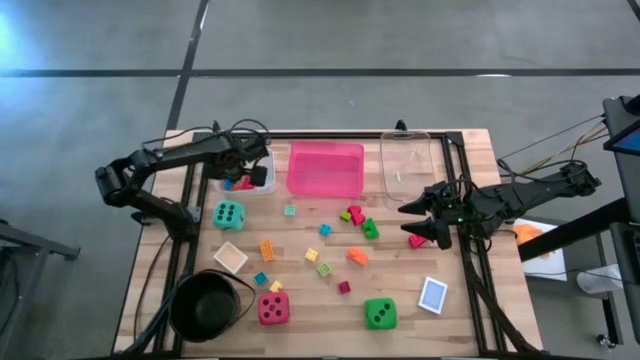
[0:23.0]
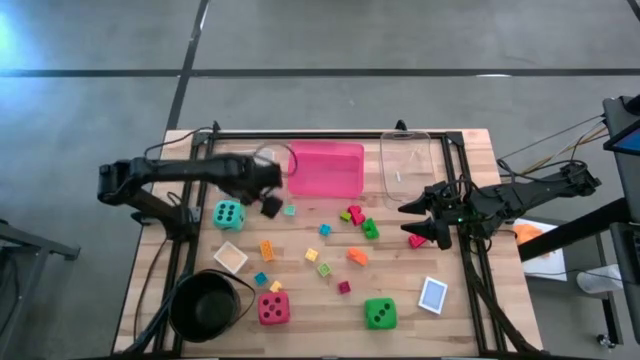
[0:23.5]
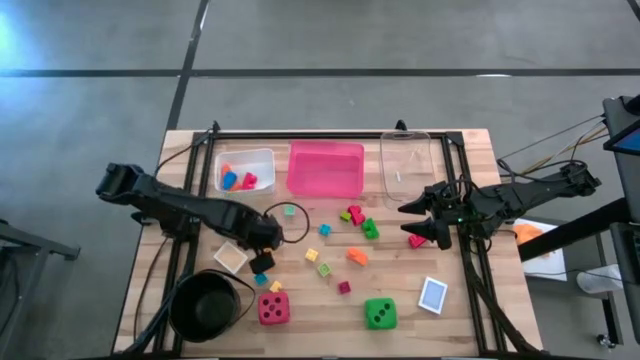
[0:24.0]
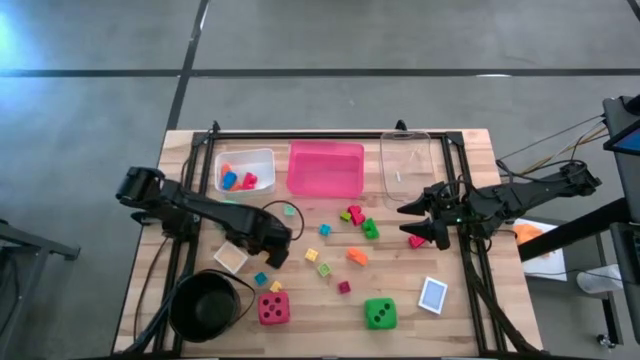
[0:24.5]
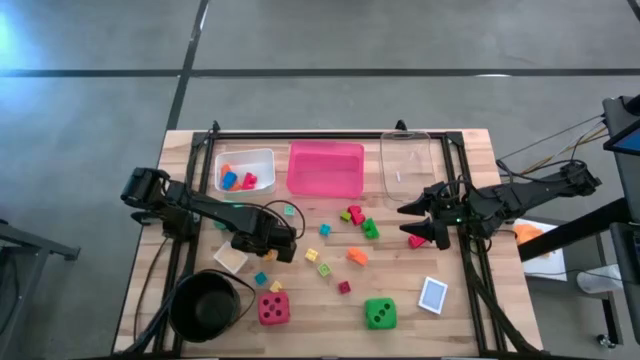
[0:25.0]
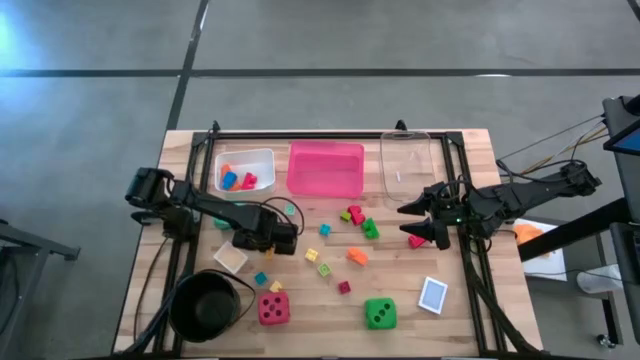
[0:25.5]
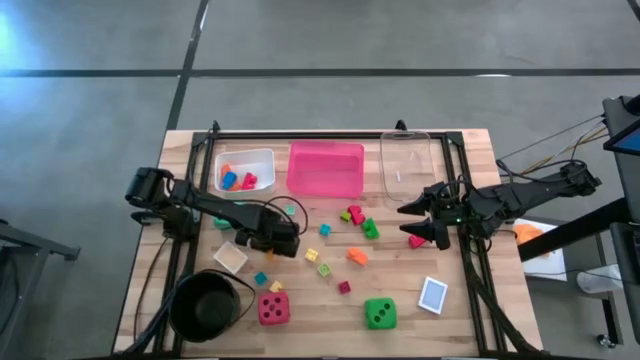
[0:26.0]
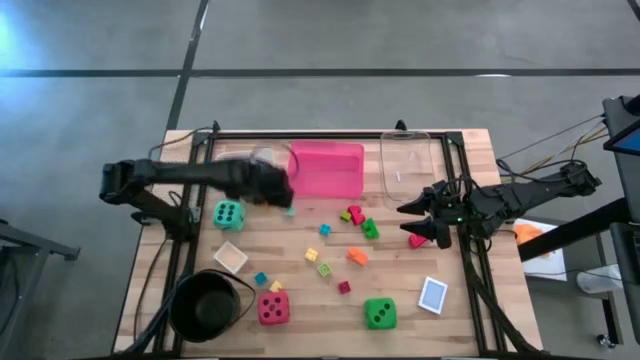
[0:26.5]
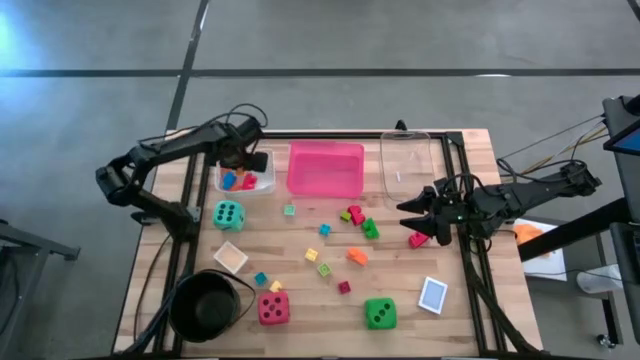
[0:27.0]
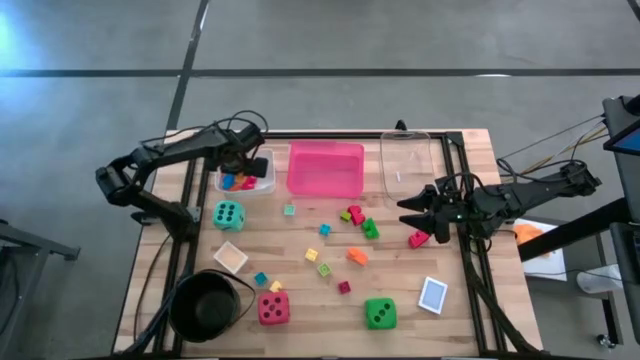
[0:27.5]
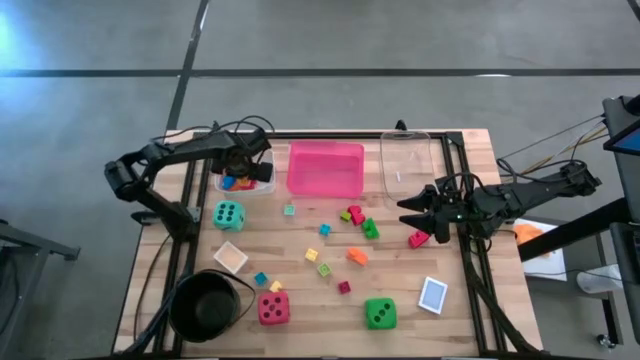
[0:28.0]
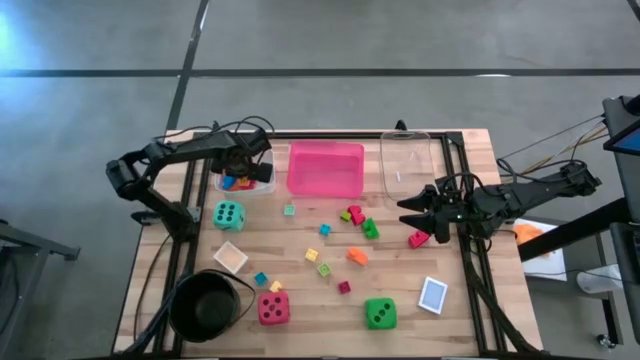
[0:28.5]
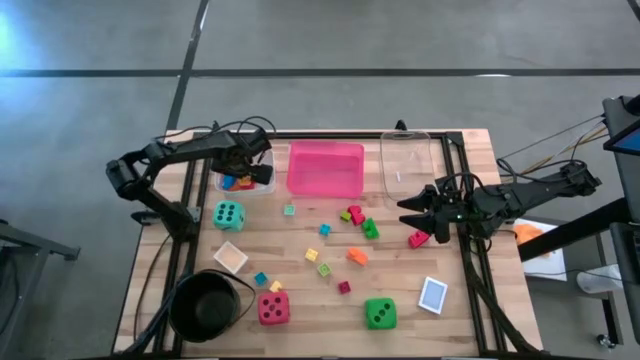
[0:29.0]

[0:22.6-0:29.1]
Task: Pick & Place Toys
Put the yellow game piece into the white bin

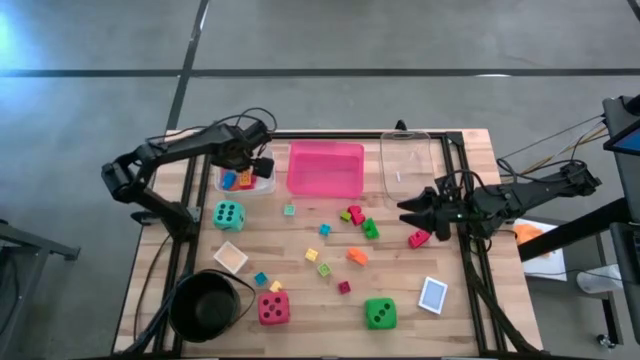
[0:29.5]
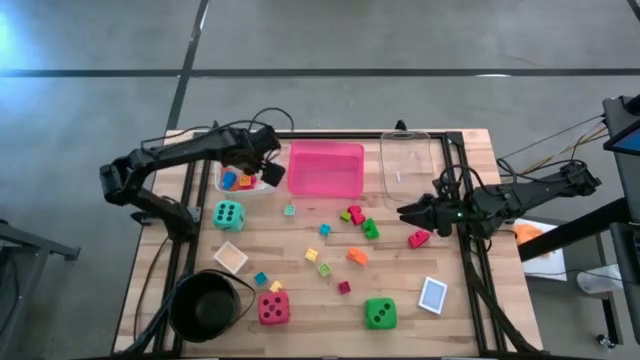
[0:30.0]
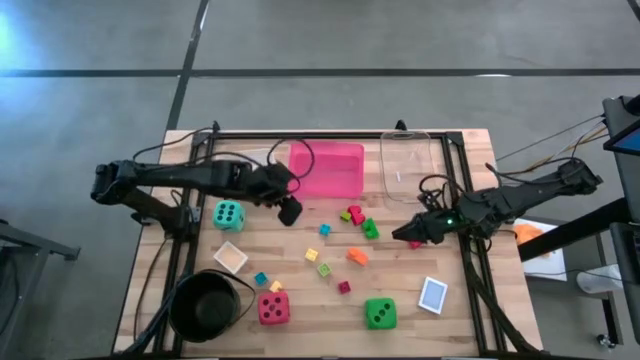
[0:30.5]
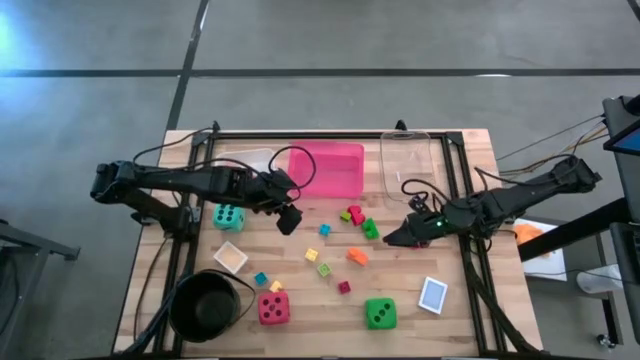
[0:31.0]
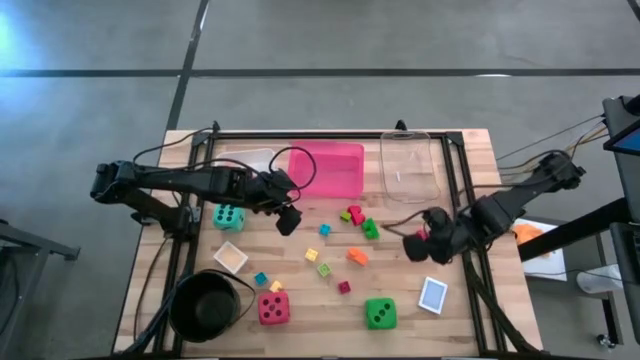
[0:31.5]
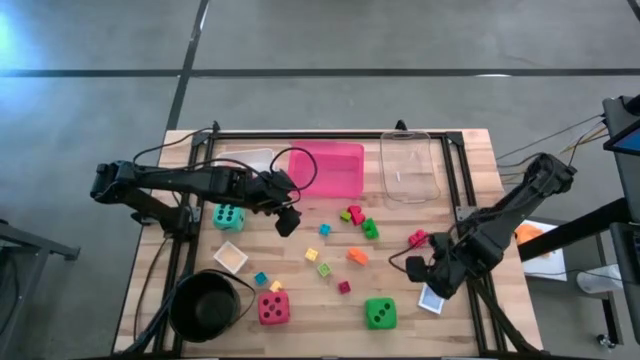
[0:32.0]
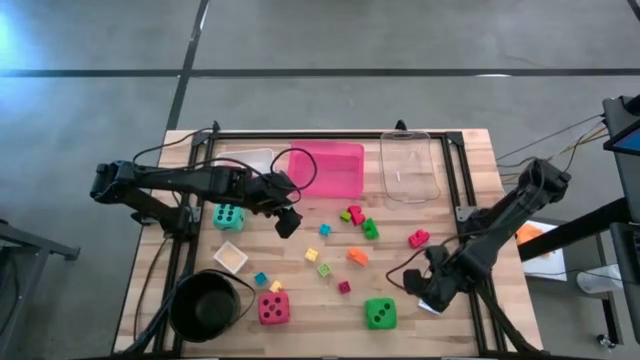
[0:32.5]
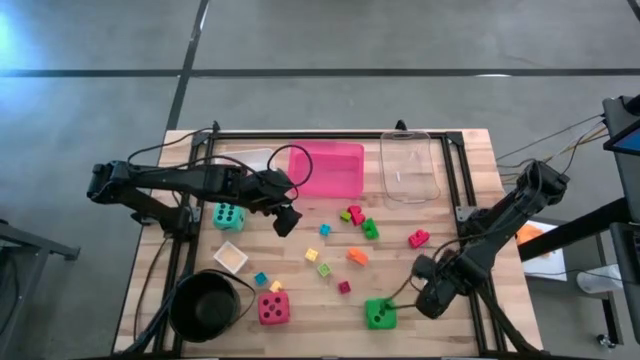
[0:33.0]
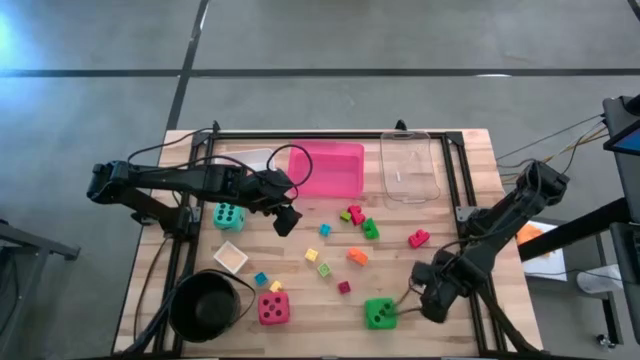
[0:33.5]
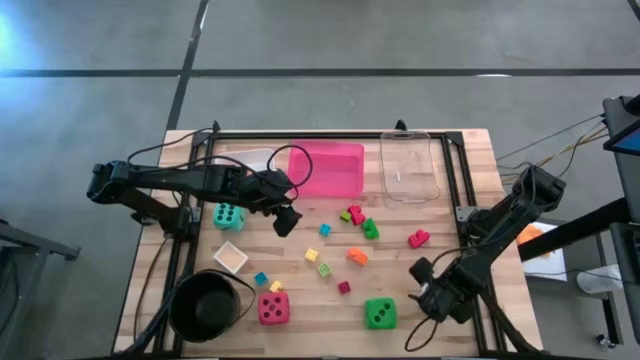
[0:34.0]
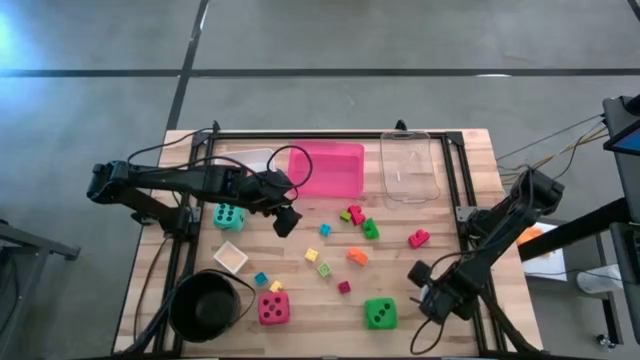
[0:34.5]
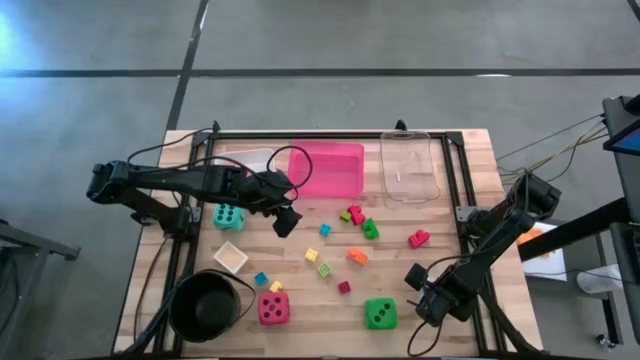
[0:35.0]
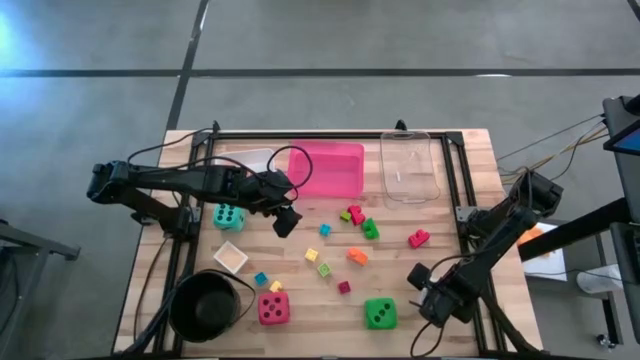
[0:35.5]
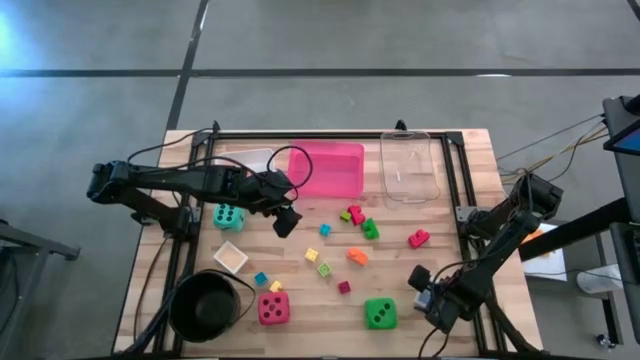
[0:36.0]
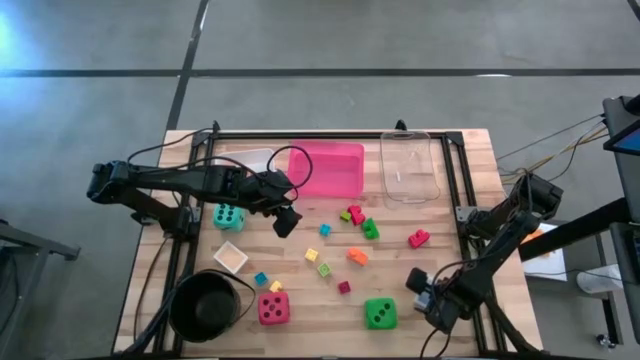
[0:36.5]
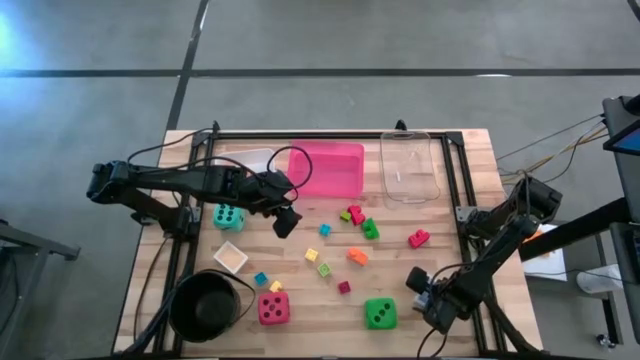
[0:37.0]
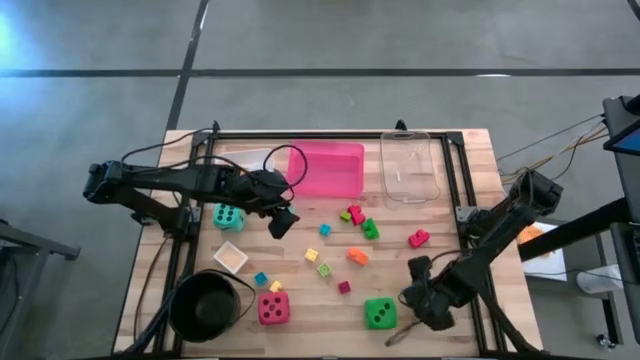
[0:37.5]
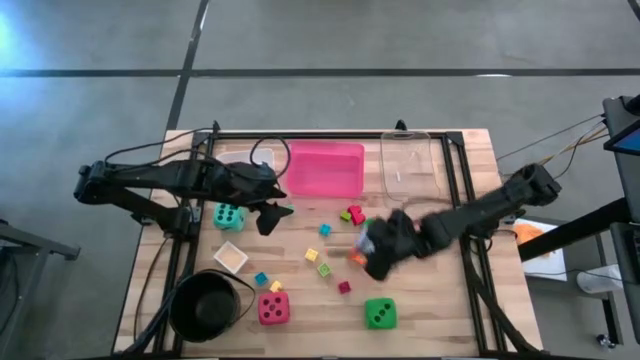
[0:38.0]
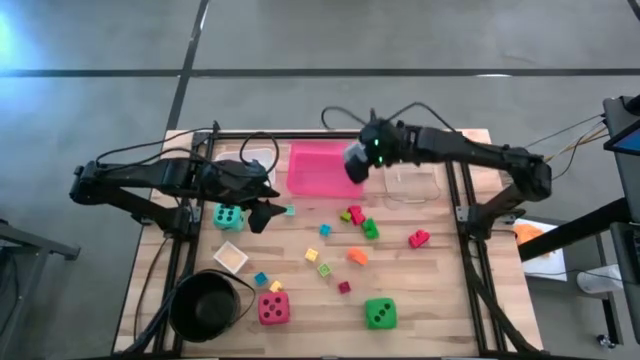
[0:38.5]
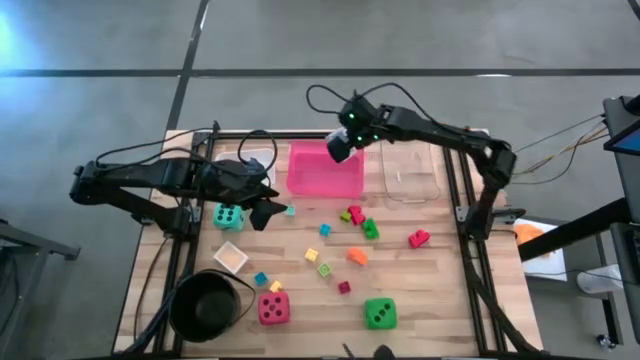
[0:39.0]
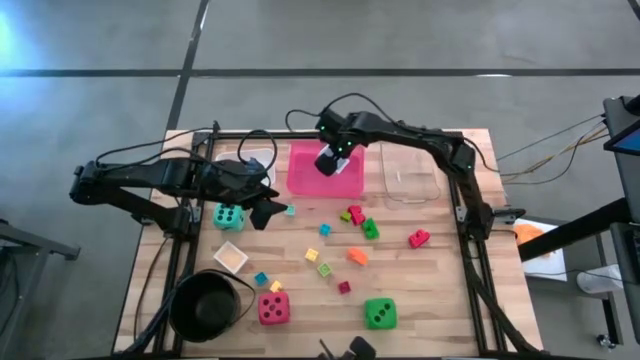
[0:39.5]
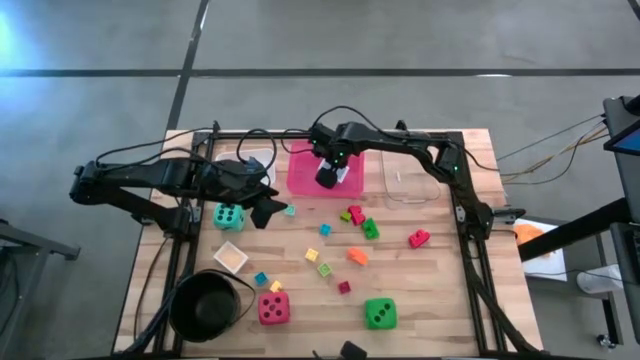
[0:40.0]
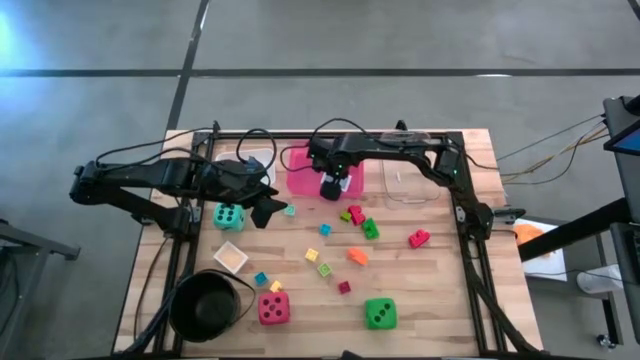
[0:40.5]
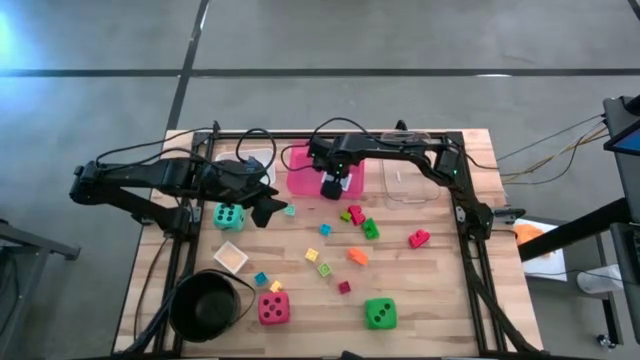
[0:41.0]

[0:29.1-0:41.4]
Put the blue deck of cards into the red bin

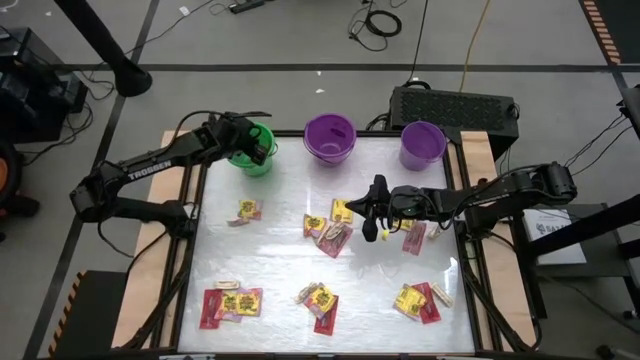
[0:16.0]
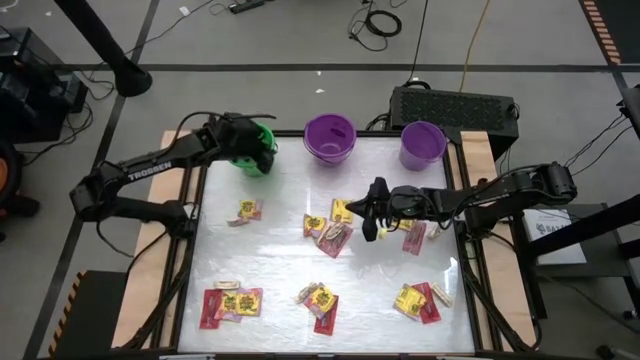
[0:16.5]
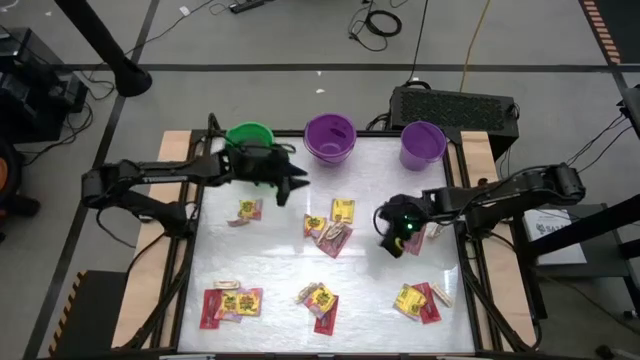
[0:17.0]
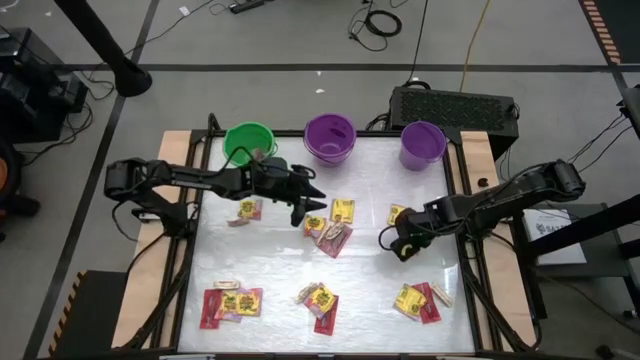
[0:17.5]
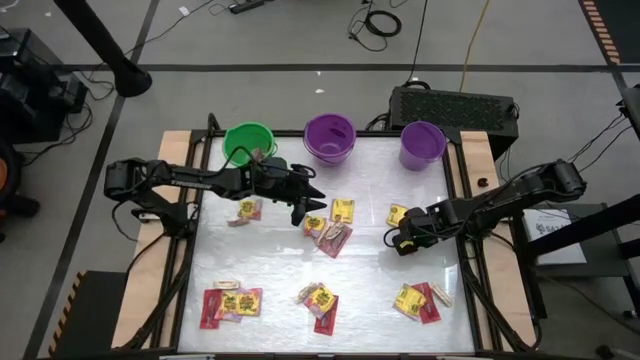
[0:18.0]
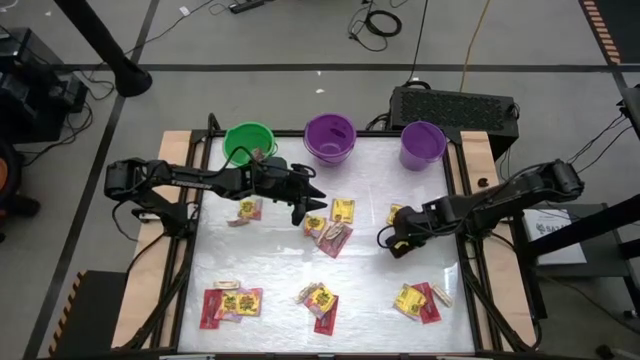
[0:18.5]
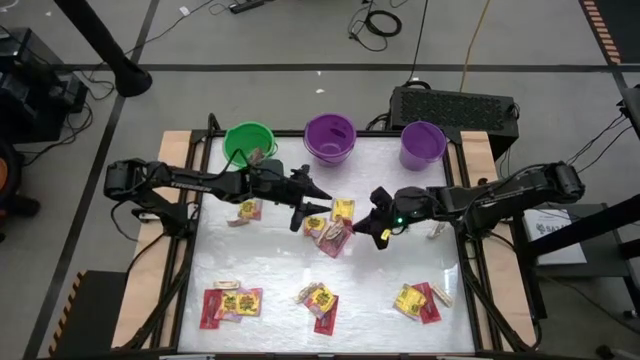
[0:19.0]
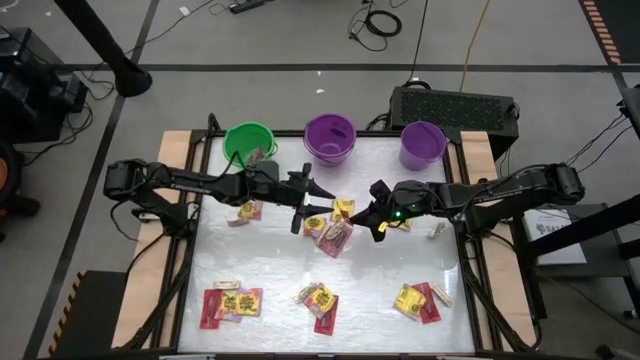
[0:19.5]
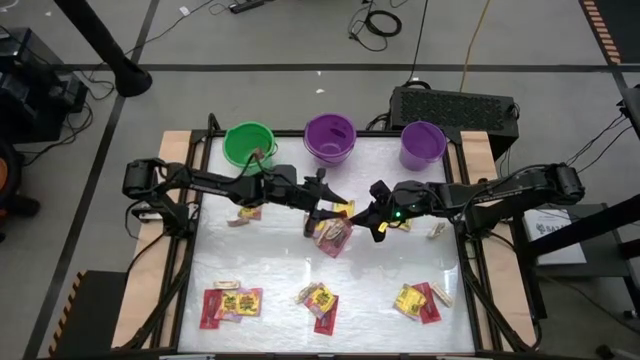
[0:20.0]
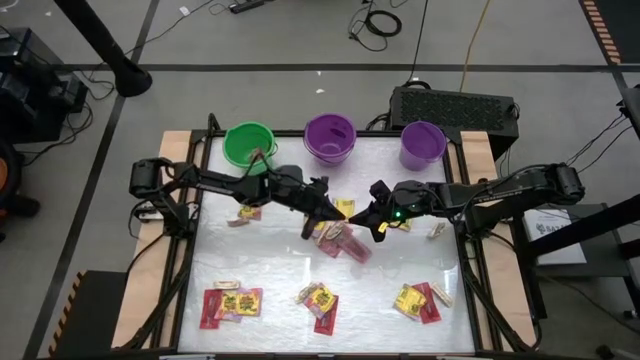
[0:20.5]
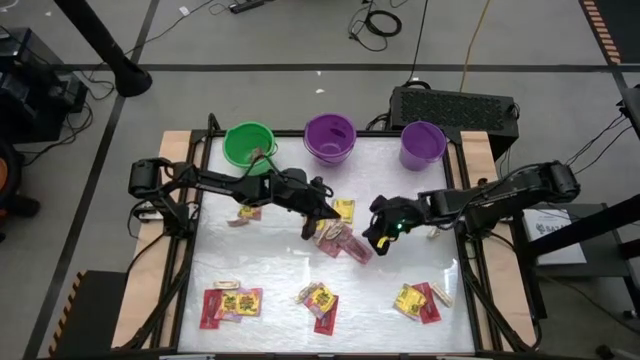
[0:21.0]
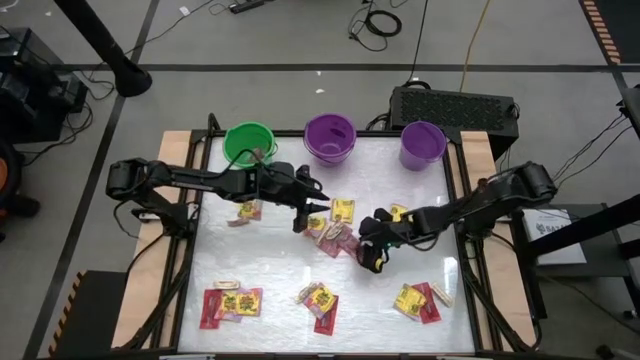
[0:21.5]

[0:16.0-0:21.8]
Task: Sort candy by brand, put in halloween buckets
Put the red candy pack in the green bucket
